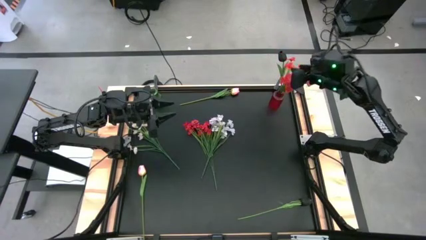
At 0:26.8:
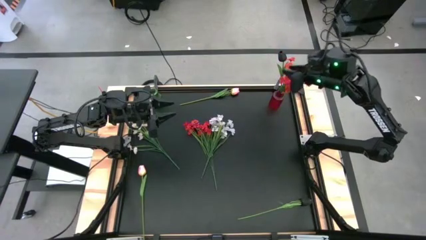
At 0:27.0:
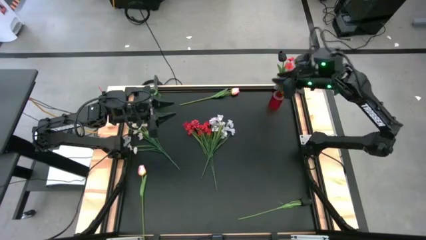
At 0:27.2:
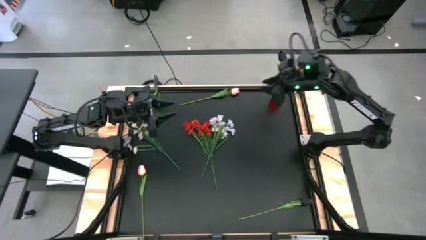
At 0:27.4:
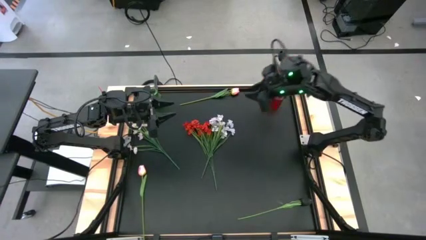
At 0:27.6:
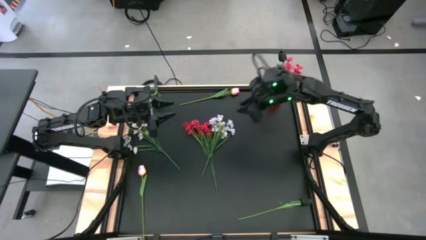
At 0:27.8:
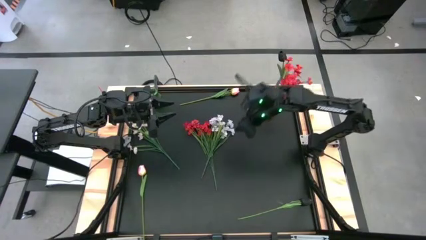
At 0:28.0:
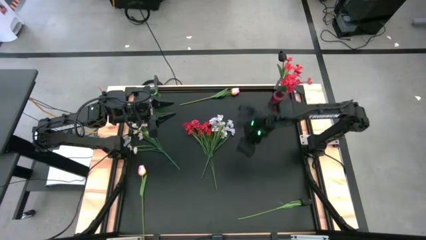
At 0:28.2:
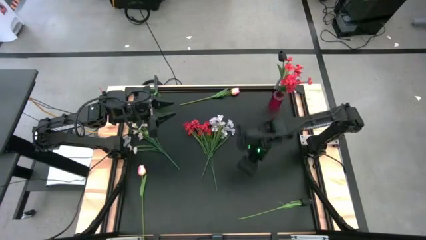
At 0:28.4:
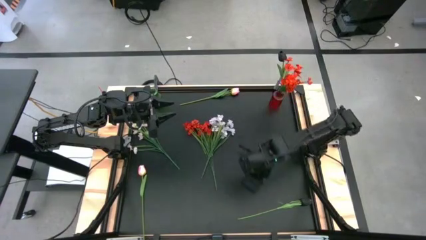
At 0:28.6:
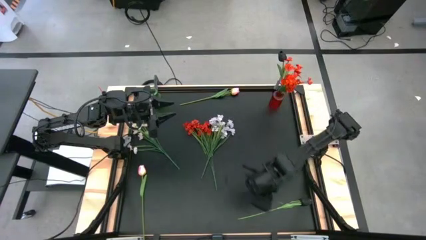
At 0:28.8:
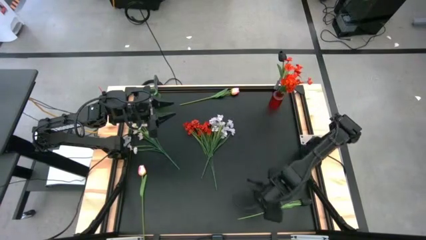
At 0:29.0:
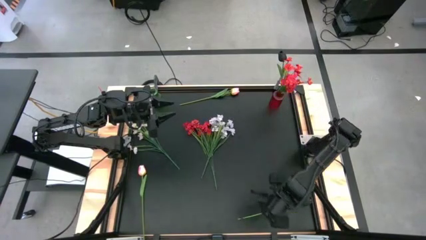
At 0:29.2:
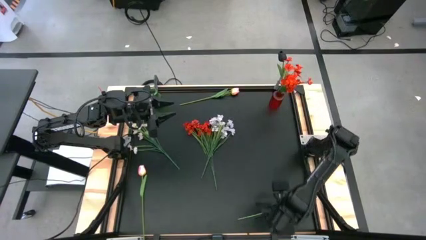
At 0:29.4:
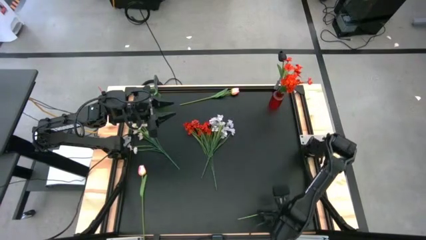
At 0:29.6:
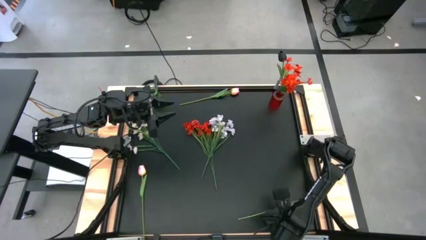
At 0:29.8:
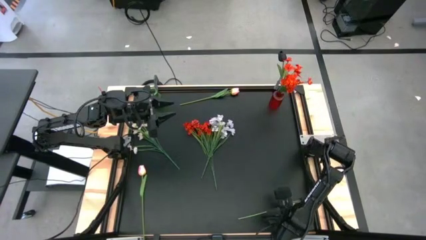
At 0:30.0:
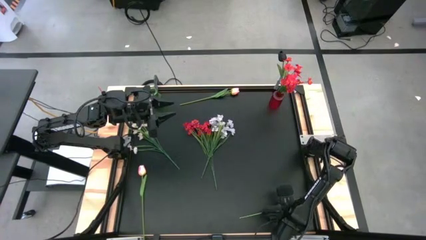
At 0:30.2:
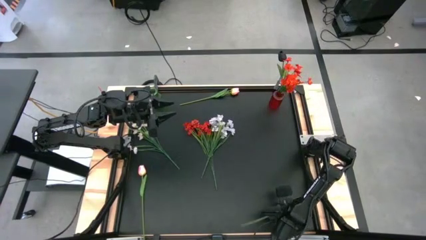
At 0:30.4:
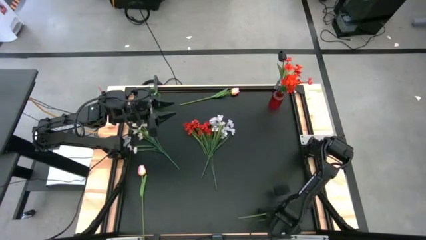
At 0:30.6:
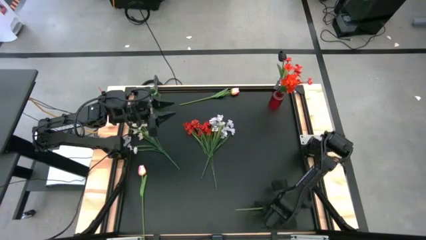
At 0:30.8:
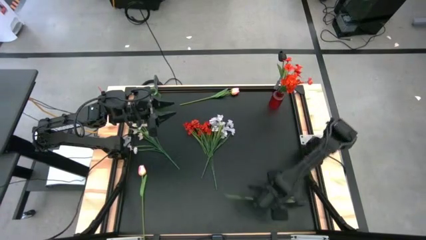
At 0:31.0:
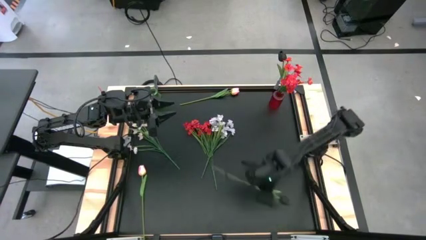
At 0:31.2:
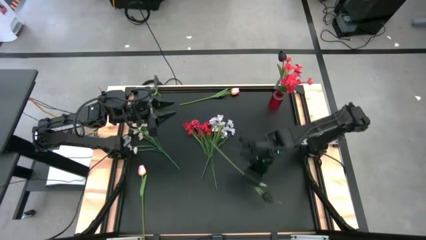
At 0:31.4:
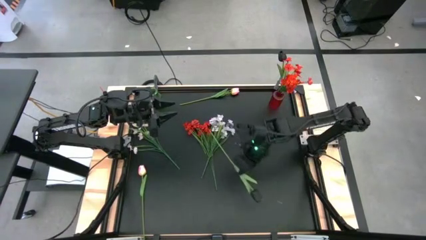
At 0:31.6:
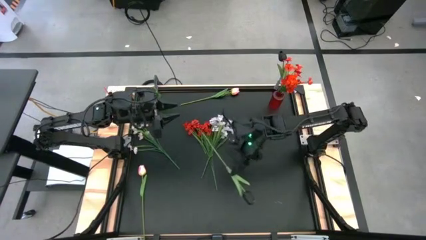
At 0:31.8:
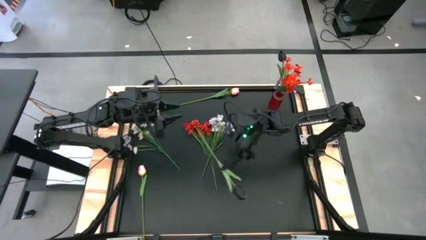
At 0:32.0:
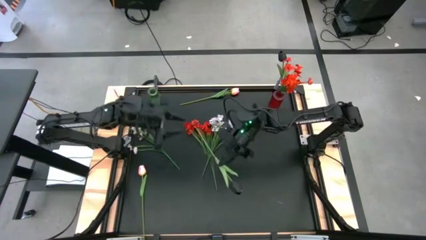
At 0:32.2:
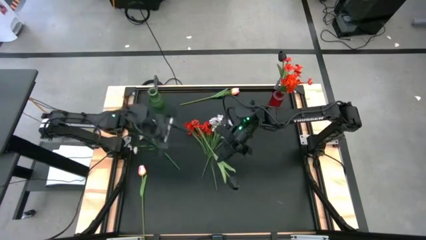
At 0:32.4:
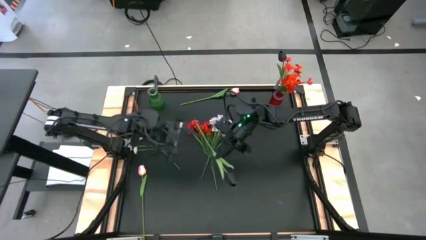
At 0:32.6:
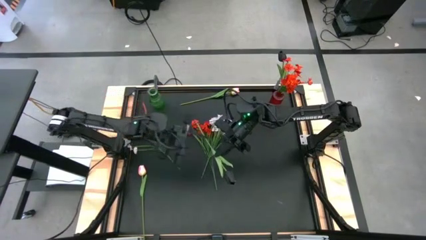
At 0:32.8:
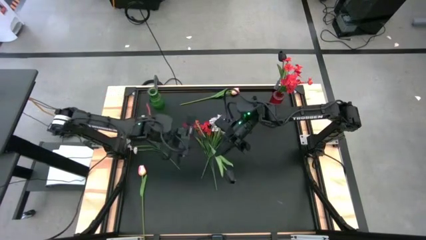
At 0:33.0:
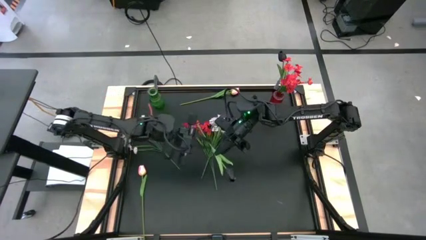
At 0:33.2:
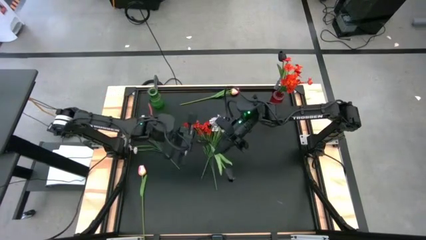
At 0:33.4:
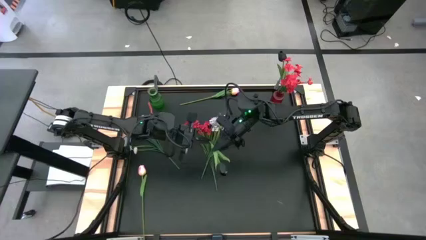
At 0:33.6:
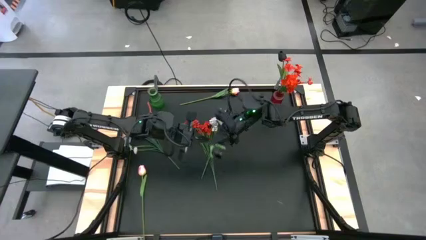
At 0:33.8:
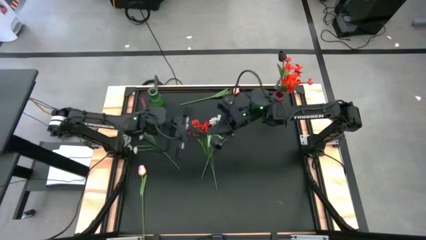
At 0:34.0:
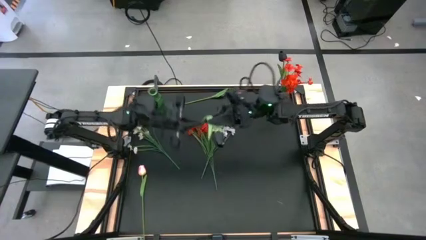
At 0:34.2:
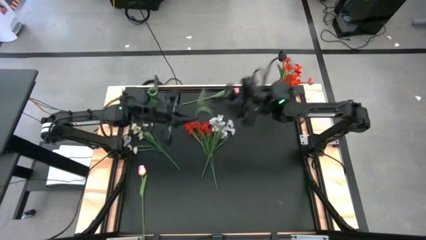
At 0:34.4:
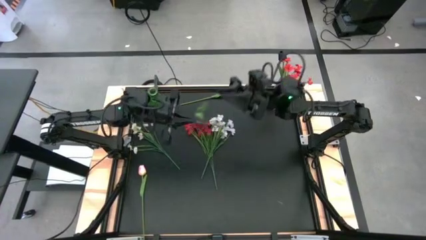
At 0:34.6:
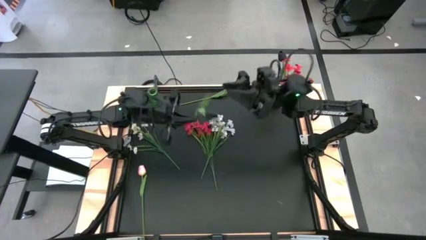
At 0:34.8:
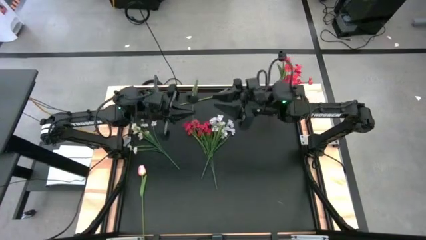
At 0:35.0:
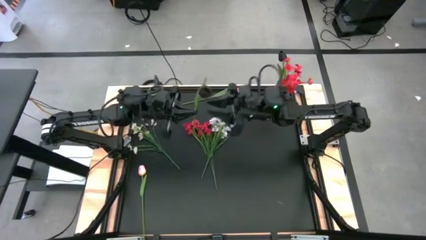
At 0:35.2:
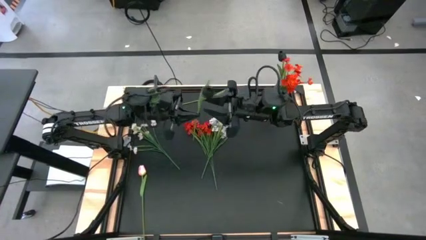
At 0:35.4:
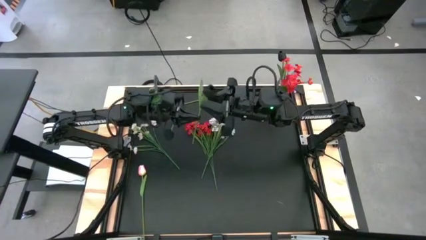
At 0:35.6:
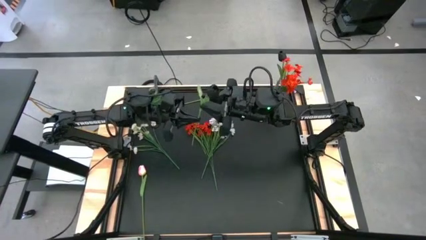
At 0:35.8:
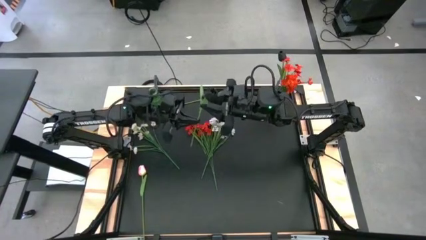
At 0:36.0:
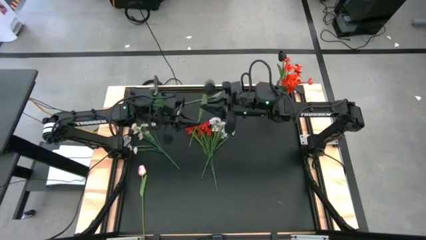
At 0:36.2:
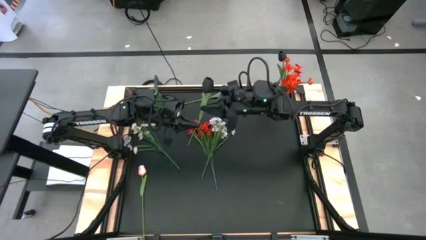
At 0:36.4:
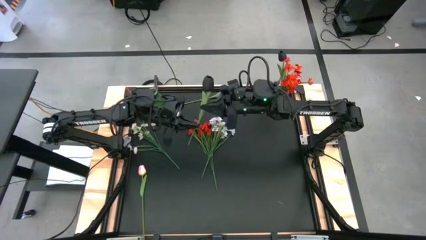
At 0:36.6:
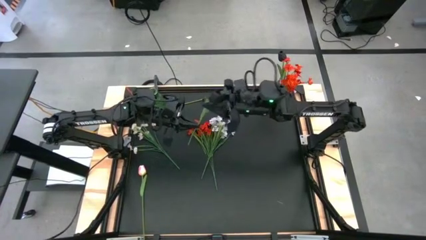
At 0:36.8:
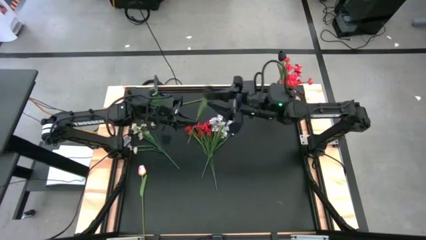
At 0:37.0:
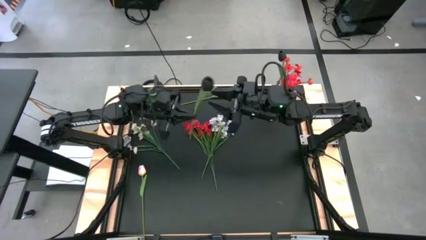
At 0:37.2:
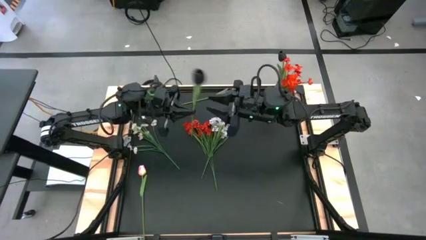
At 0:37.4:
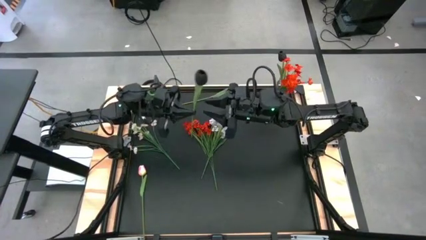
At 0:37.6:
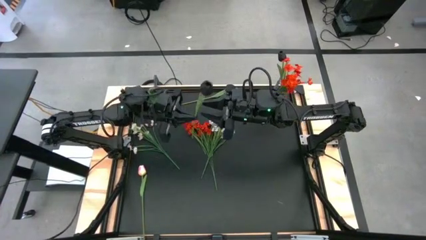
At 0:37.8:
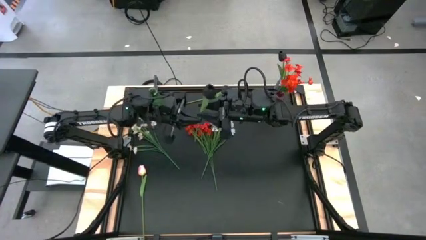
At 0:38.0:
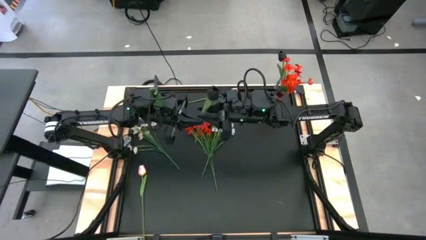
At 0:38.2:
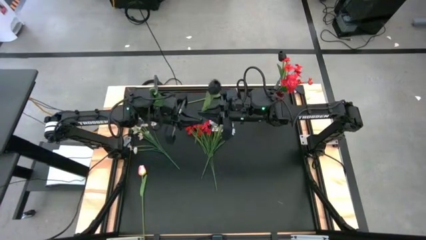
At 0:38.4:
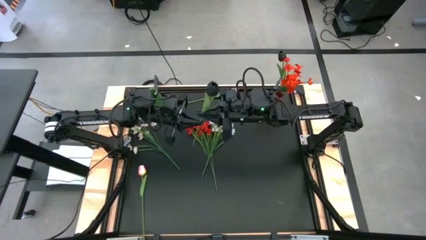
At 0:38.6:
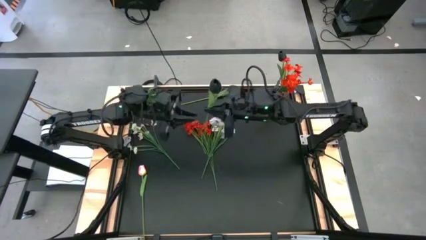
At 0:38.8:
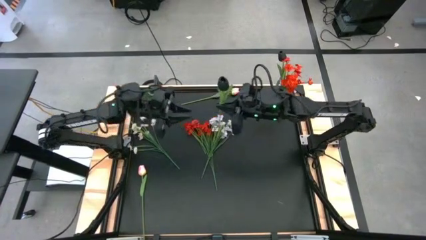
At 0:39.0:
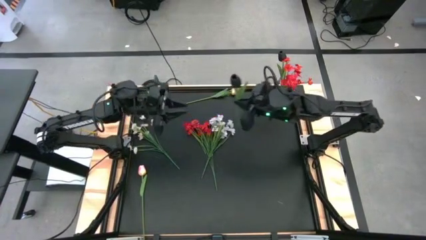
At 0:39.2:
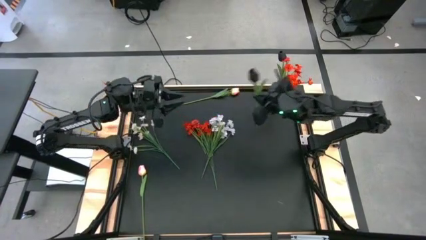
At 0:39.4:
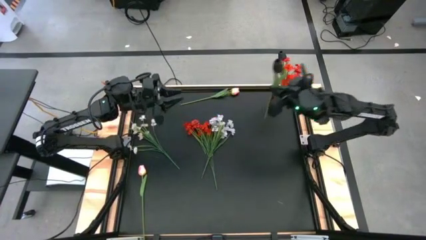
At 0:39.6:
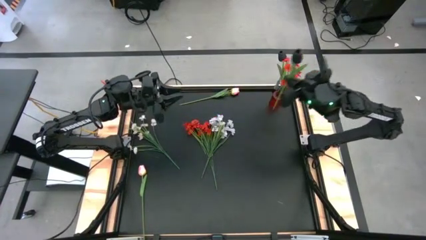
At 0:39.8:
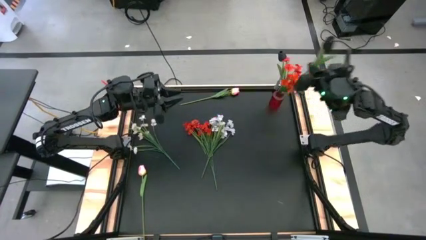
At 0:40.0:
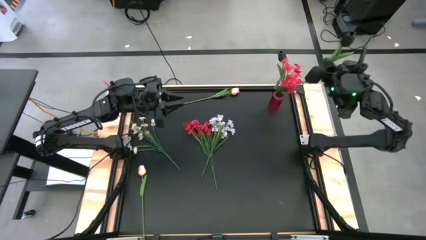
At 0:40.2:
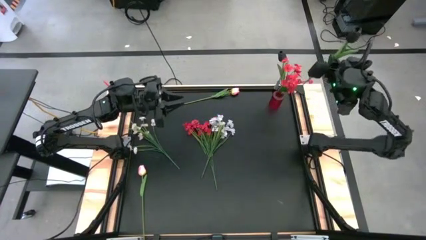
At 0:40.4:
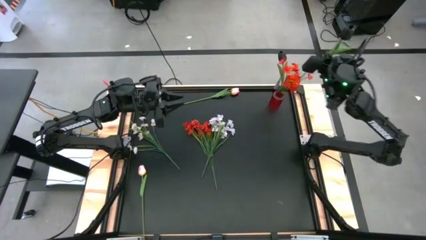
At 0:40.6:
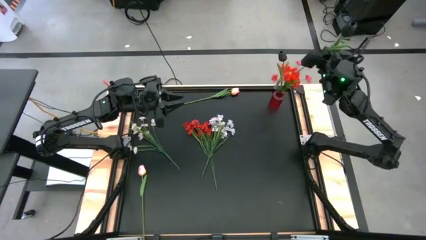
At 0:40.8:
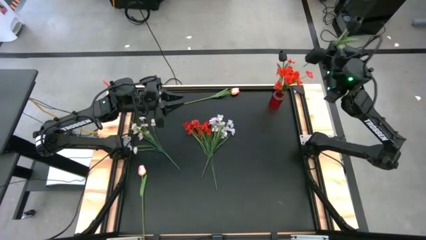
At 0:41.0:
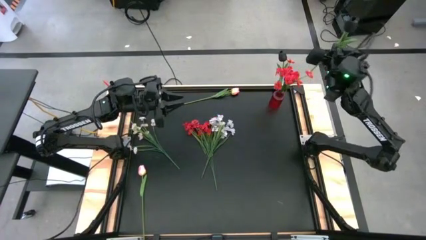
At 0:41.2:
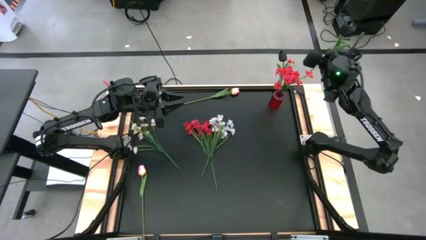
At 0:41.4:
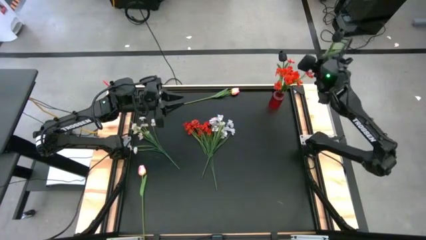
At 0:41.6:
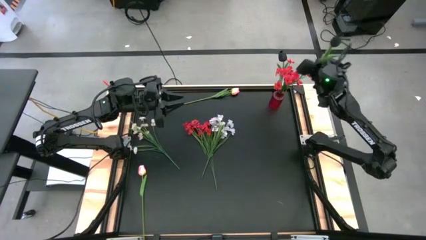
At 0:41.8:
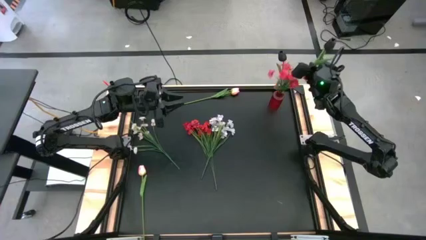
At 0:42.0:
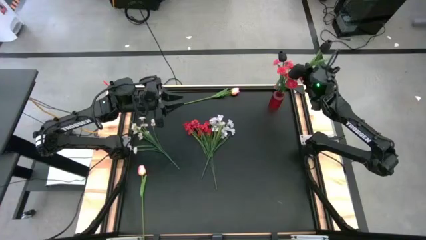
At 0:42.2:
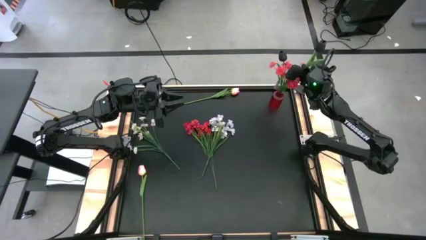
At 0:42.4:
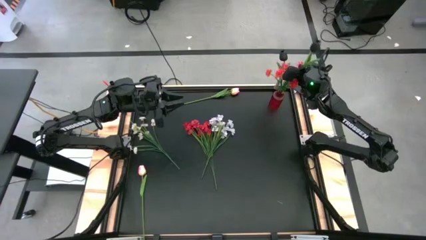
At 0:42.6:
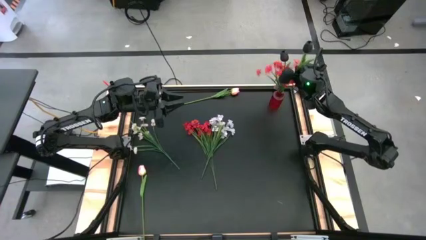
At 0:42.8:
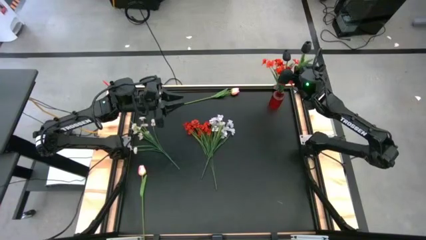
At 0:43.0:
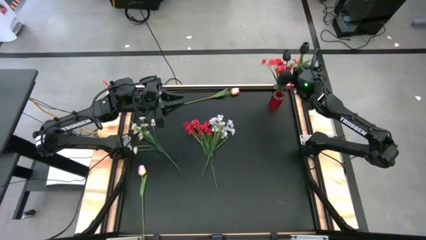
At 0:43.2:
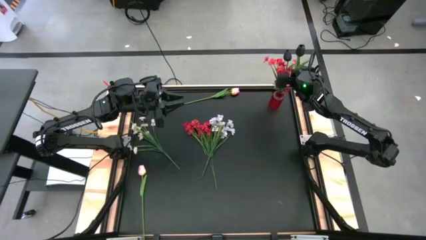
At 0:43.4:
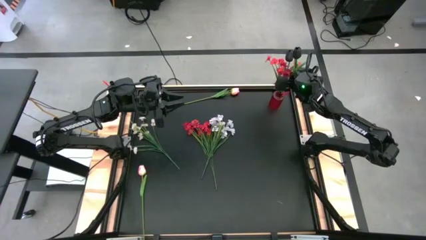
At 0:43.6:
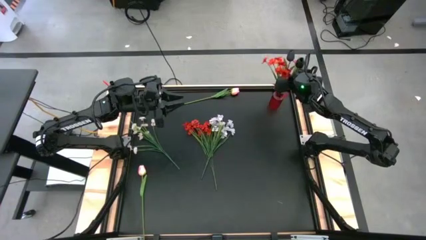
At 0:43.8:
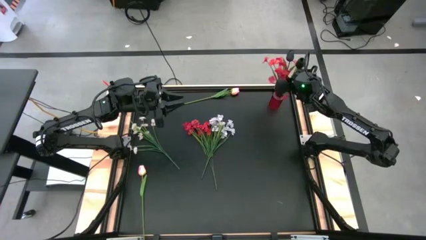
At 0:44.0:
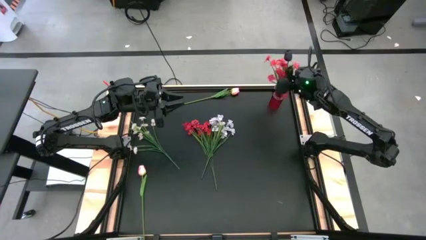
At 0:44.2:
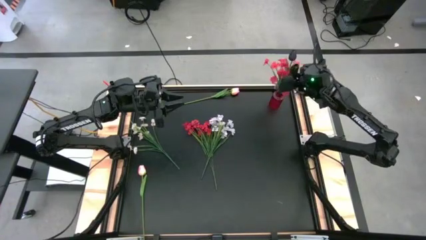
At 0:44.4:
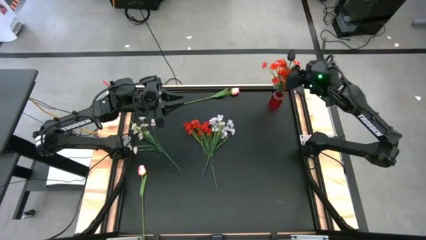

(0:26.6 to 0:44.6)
Task: Sort flowers into vase by color
Put the black tulip into the red flower vase
